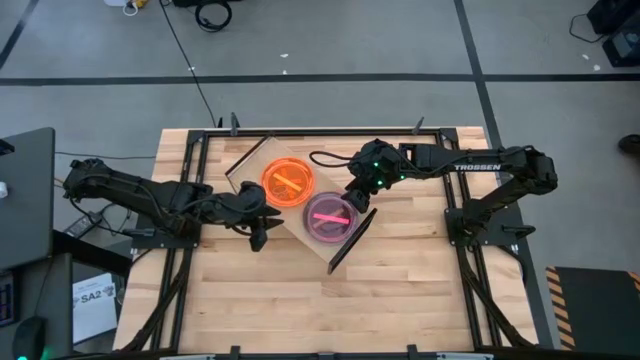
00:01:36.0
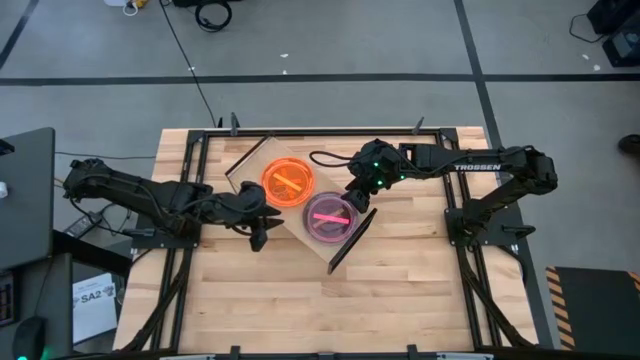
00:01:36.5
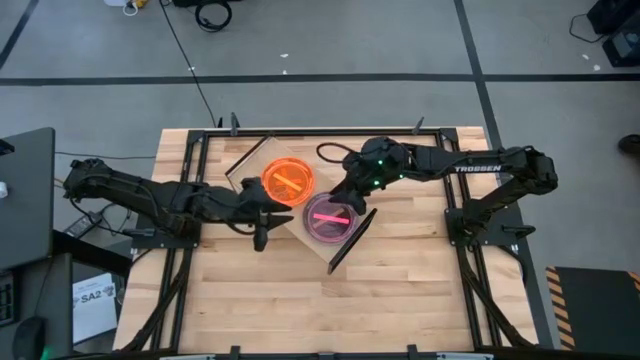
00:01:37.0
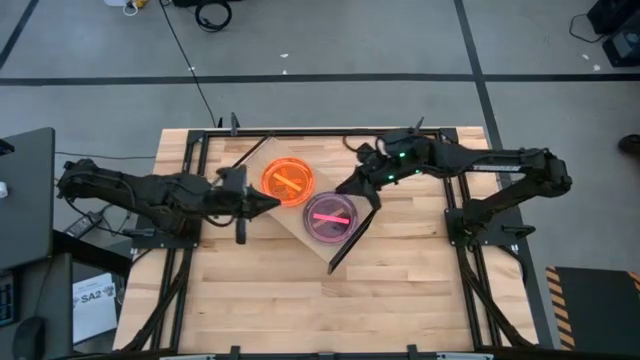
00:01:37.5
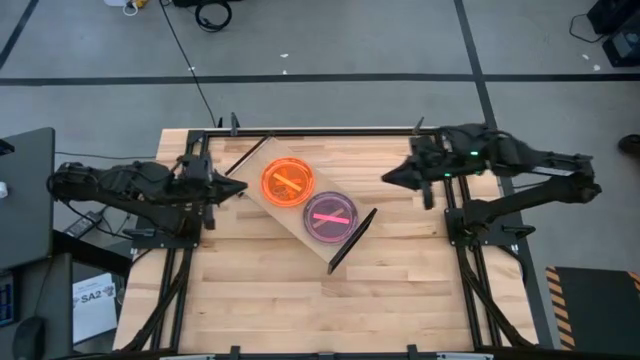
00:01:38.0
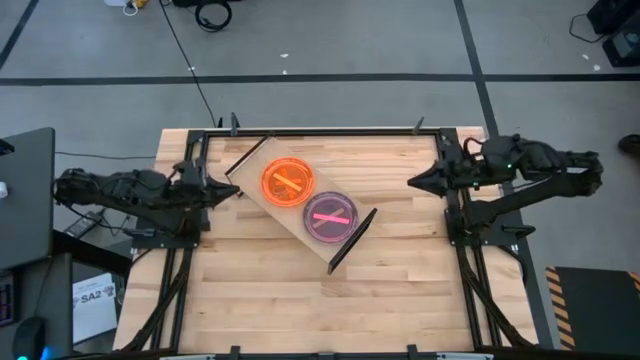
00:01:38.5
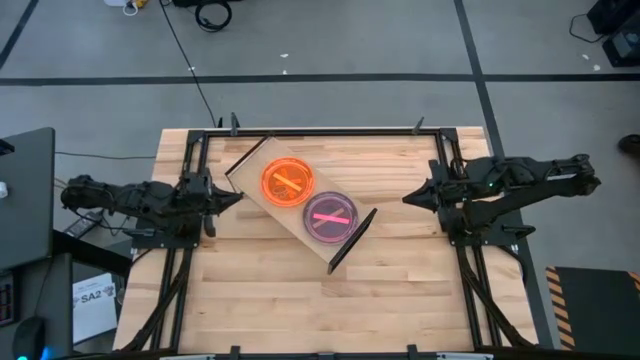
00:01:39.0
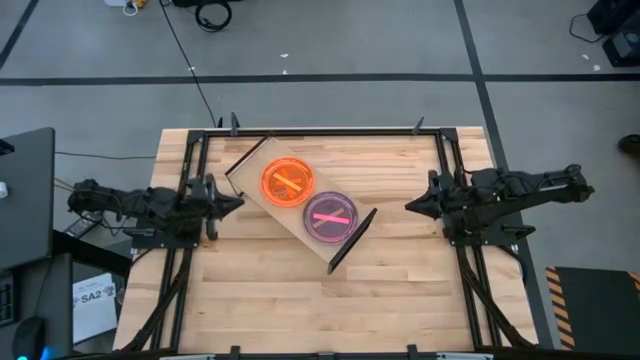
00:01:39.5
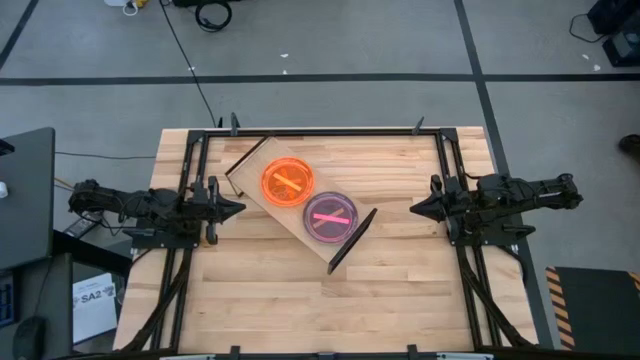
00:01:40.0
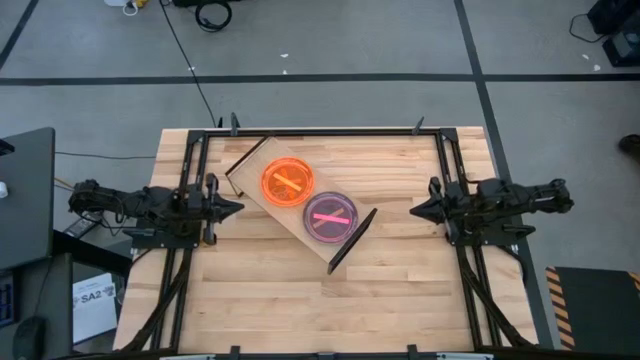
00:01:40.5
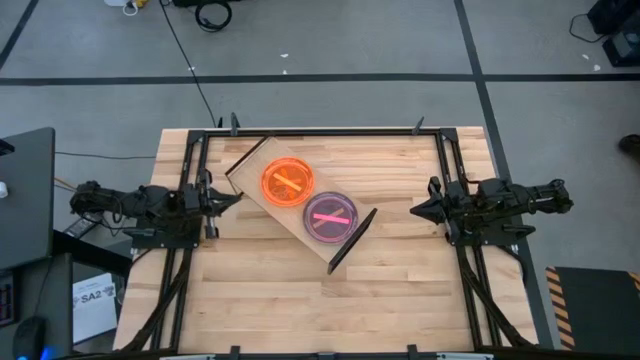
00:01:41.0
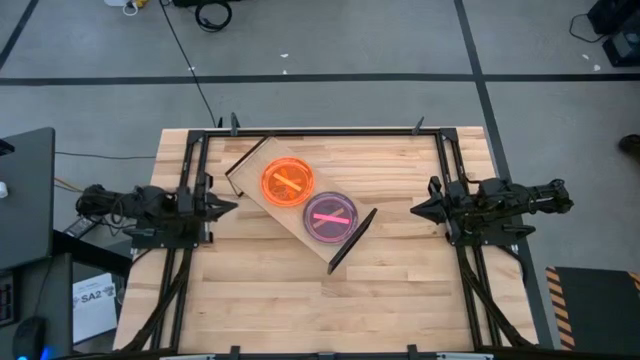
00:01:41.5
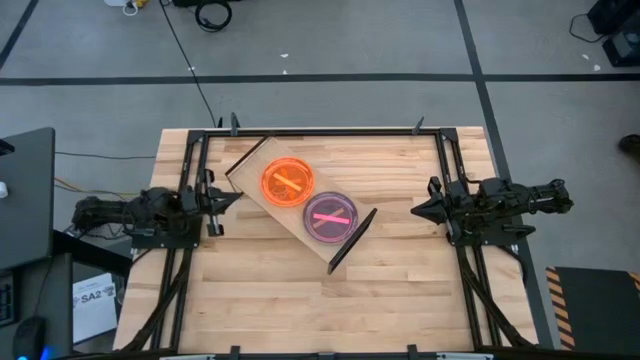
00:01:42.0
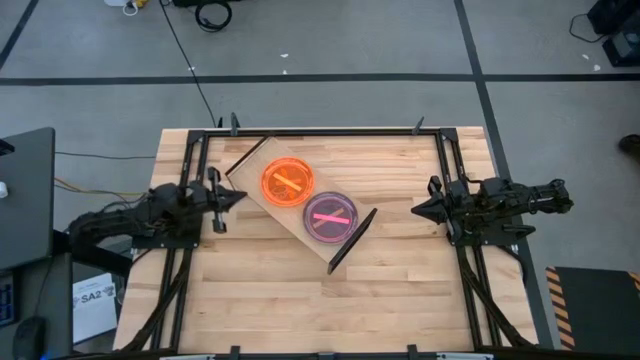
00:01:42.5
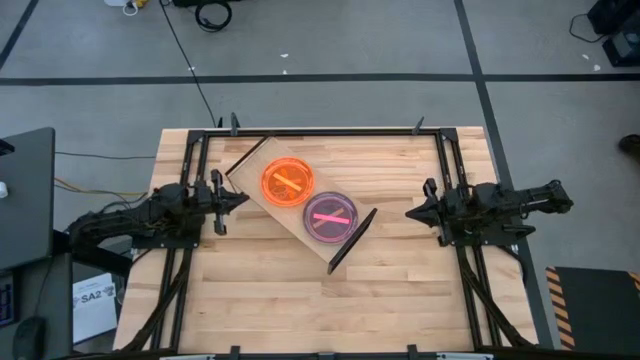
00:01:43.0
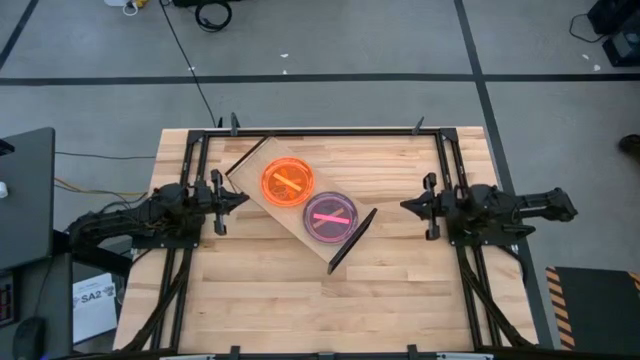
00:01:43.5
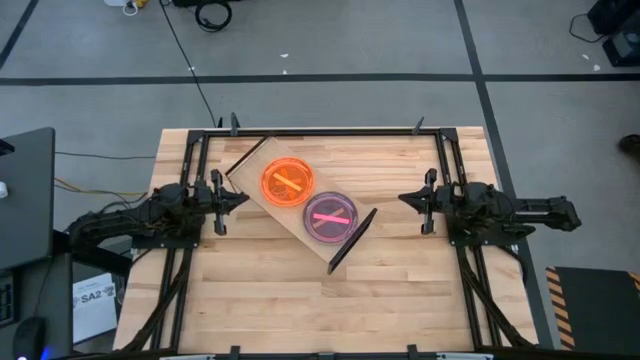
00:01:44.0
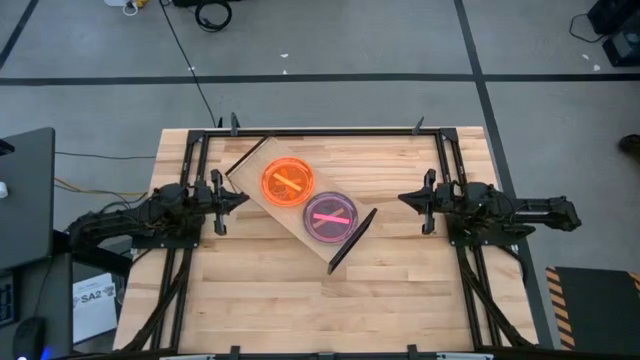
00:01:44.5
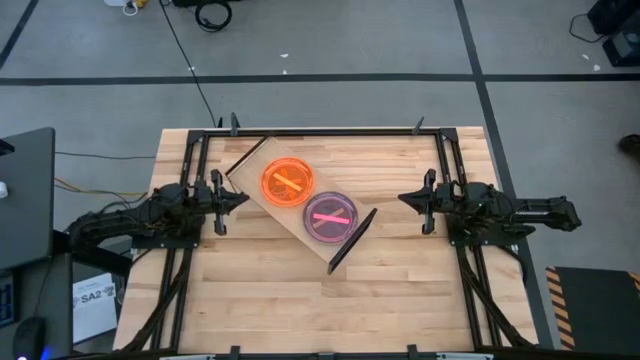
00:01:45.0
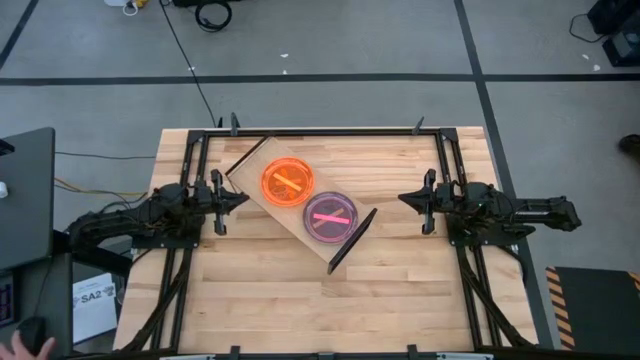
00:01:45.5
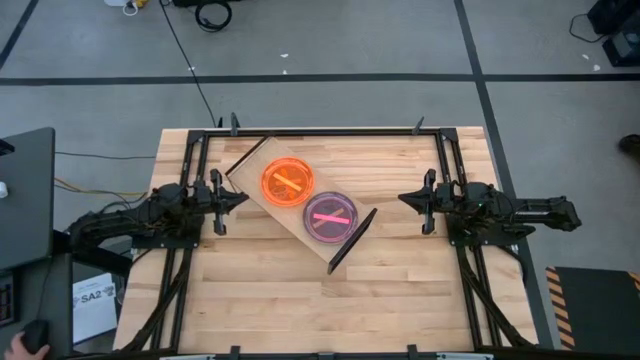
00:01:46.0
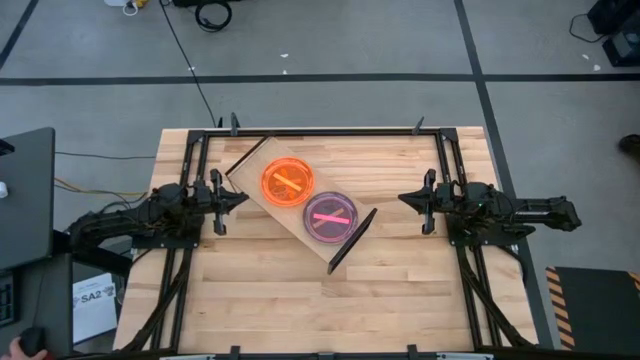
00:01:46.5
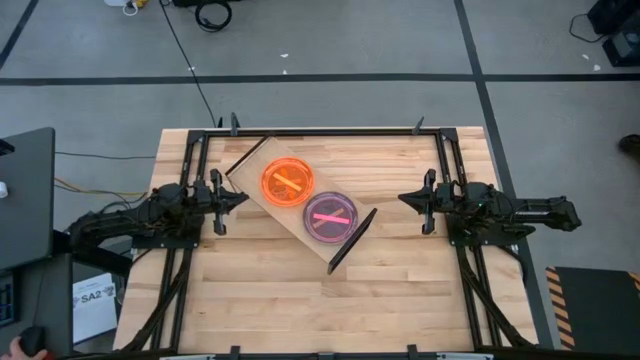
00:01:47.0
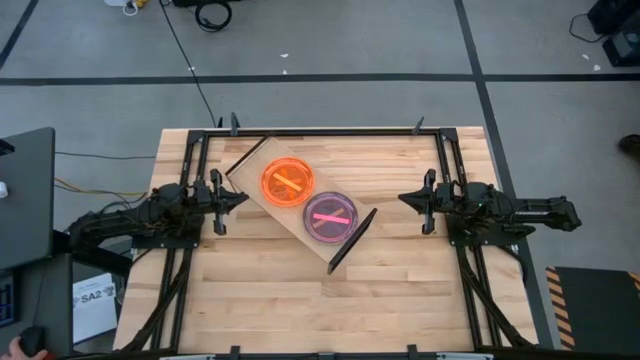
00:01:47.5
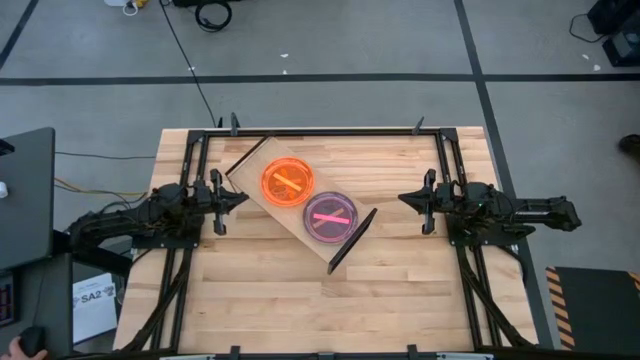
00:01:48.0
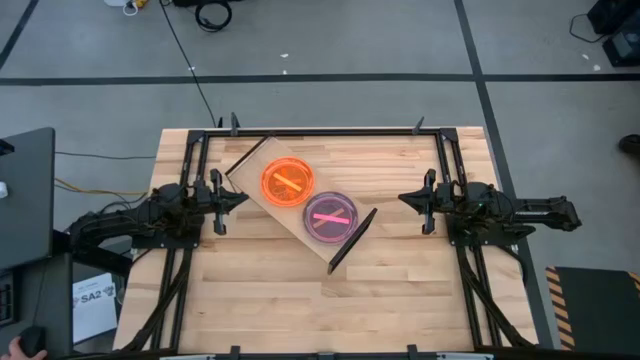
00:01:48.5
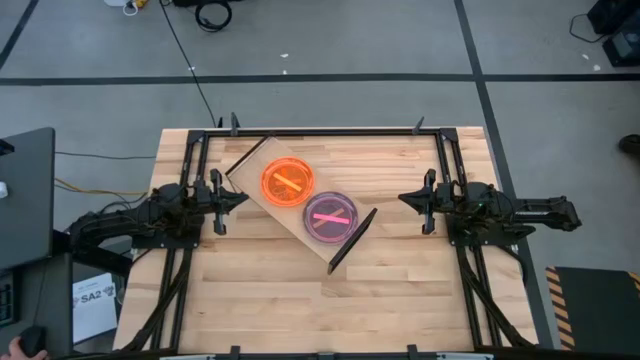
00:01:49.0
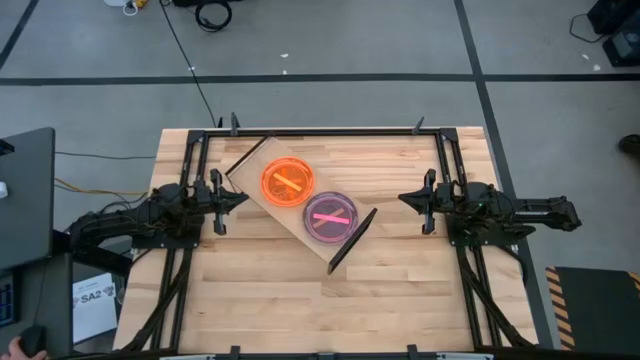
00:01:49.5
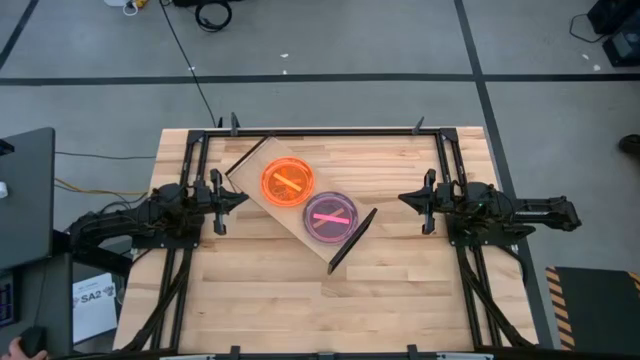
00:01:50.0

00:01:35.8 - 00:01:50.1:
Task: Place and stack plates onto a shelf
Return to Home Position

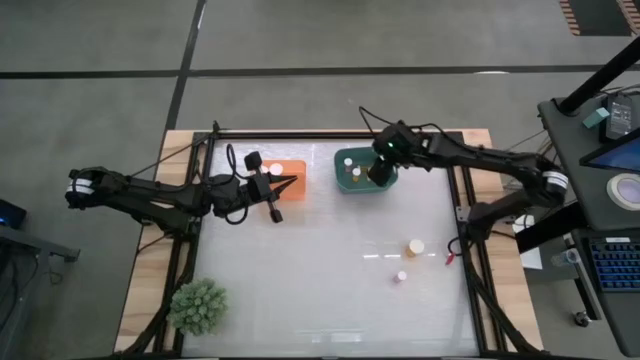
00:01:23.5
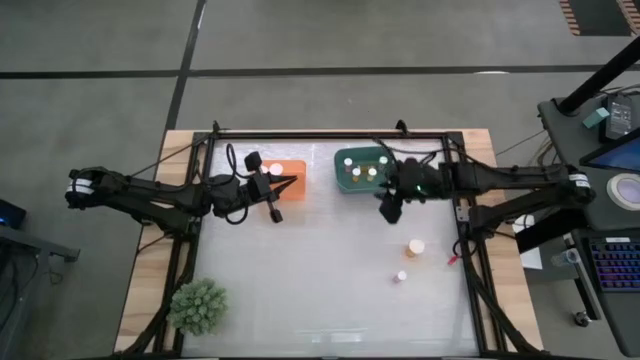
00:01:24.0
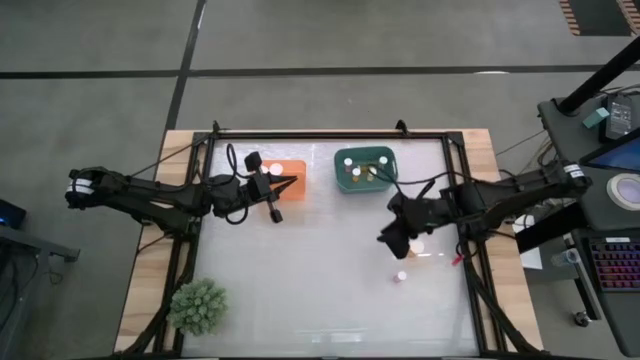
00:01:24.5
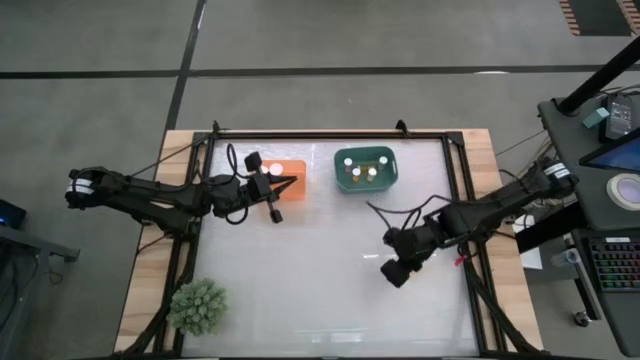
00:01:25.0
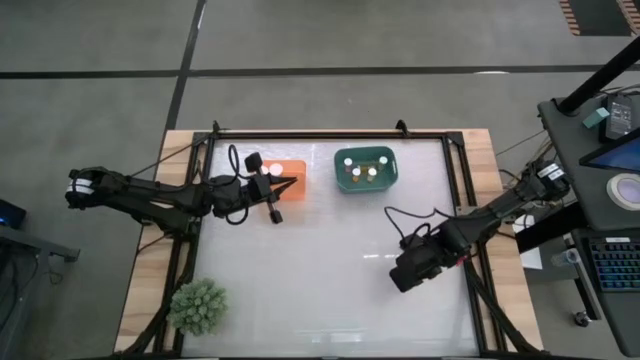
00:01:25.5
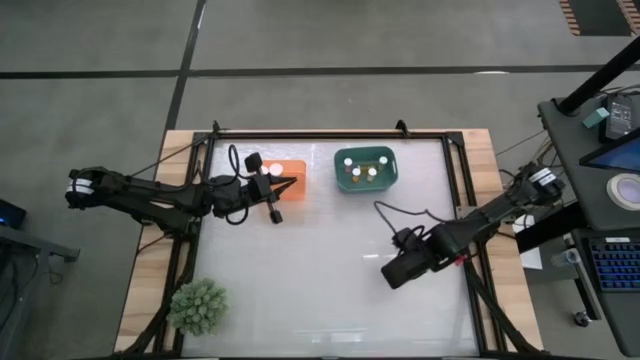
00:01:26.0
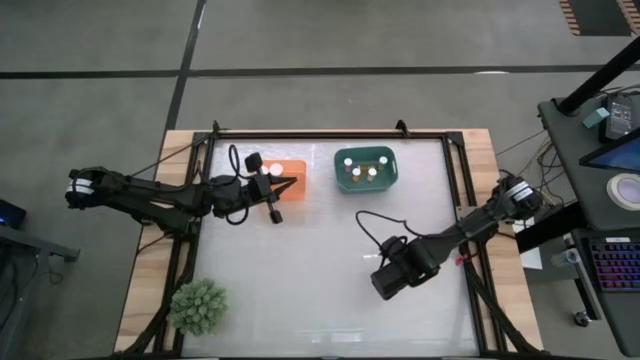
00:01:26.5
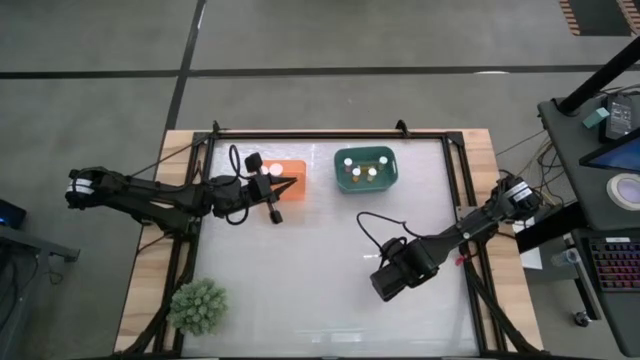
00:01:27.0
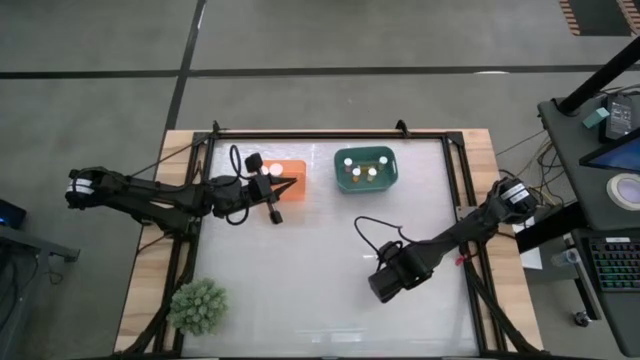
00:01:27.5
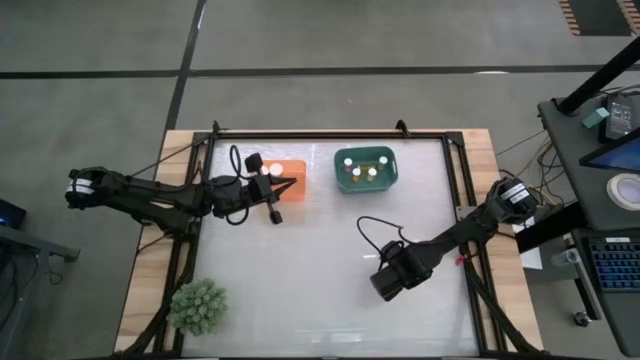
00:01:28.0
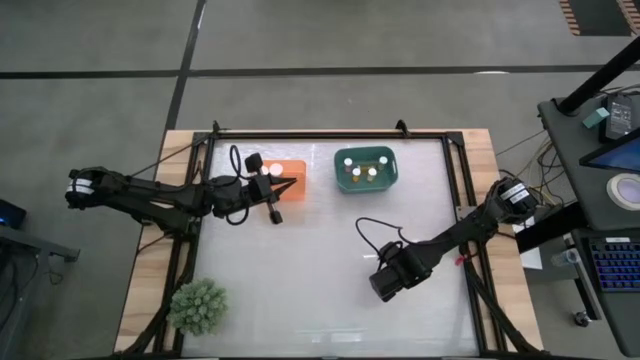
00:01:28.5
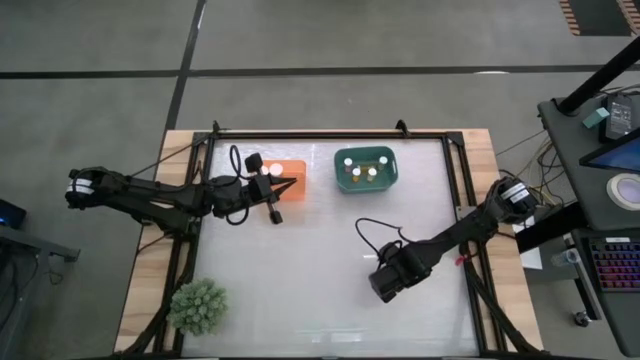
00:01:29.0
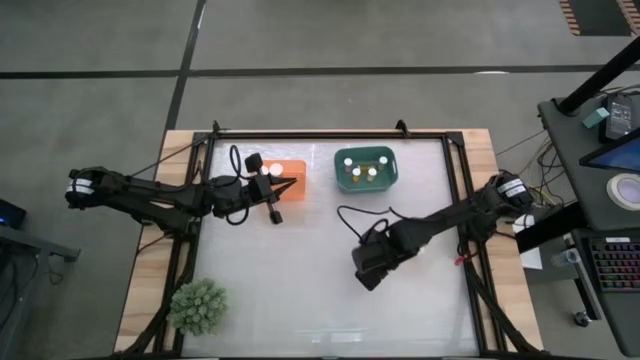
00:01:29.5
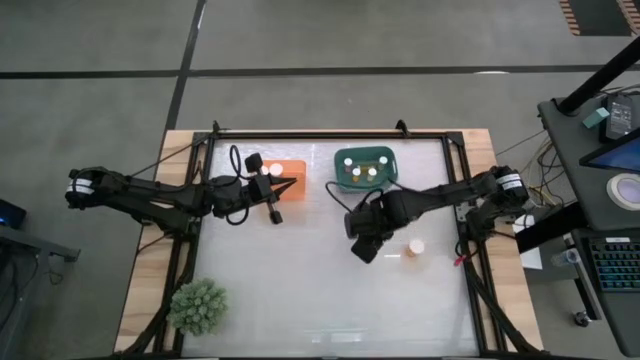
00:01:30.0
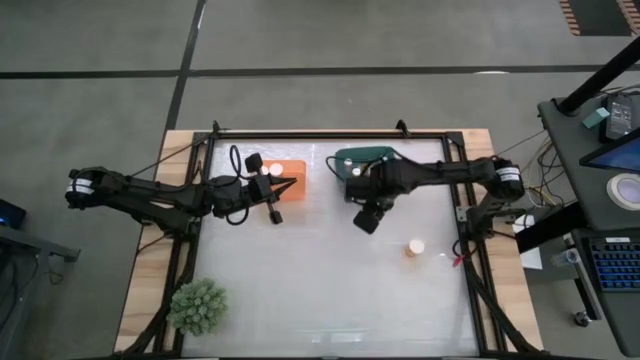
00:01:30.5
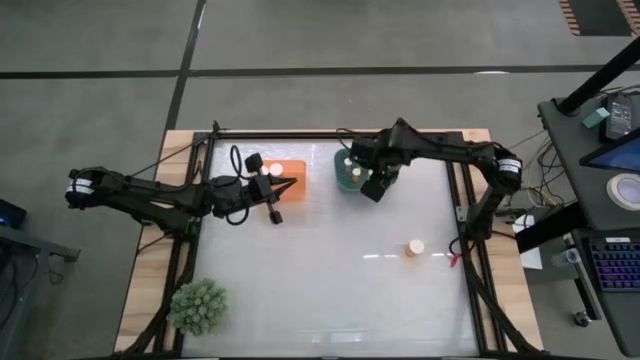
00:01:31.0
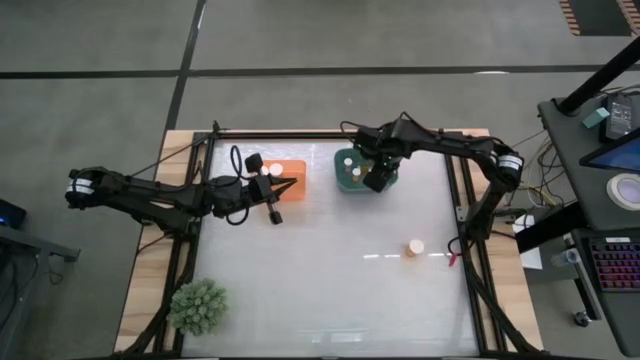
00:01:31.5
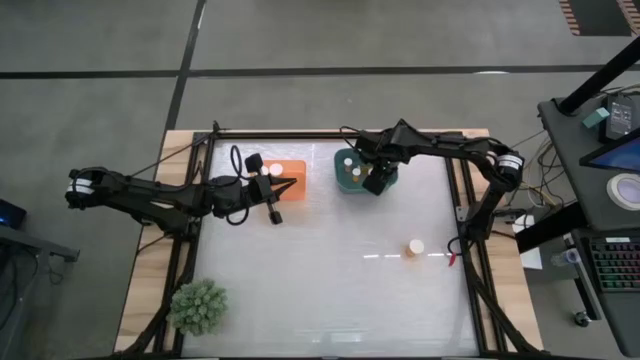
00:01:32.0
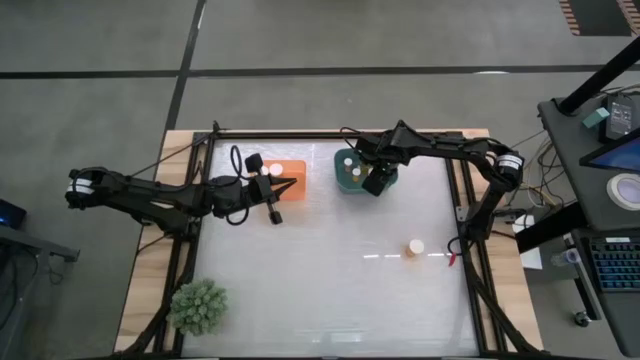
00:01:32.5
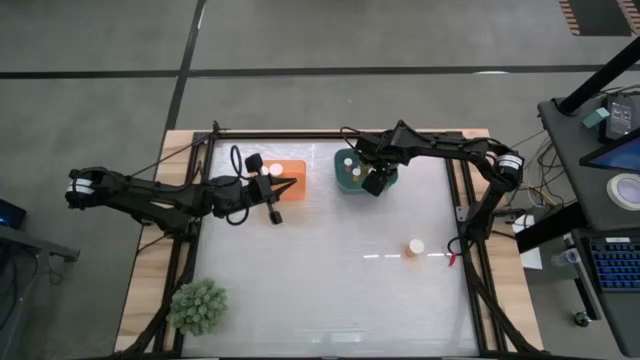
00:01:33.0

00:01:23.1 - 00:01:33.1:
Task: Pick and place medicine bottles into bin by pill shape (circle, oval)
Put the pink pill bottle into the green bin
